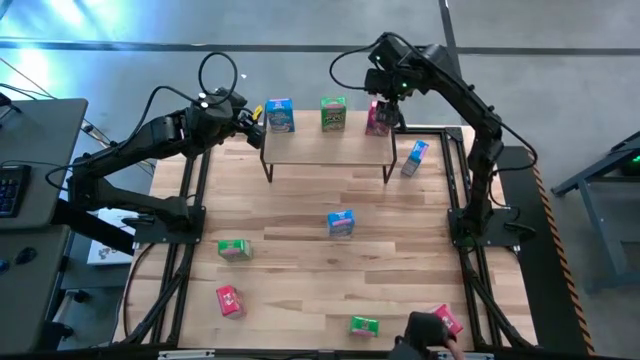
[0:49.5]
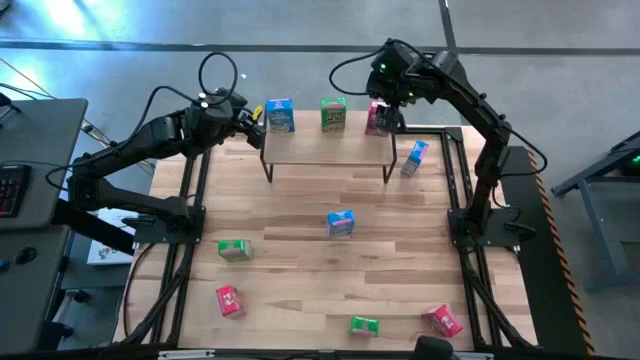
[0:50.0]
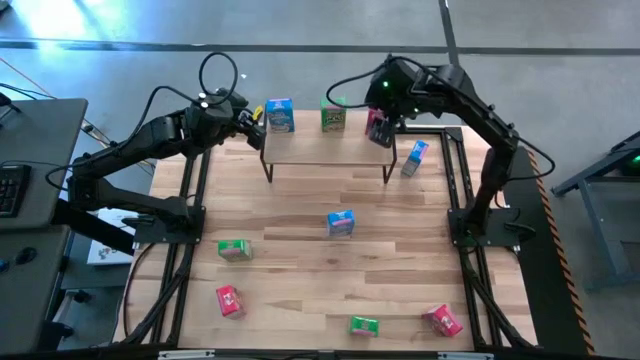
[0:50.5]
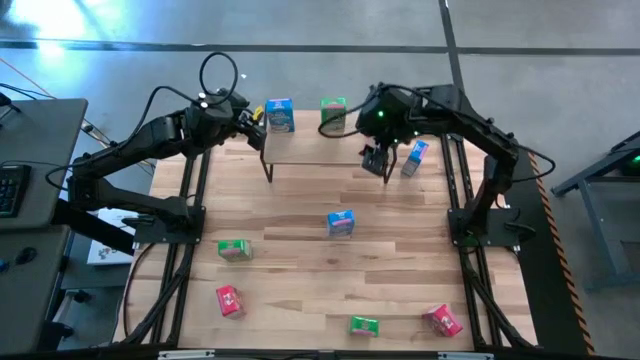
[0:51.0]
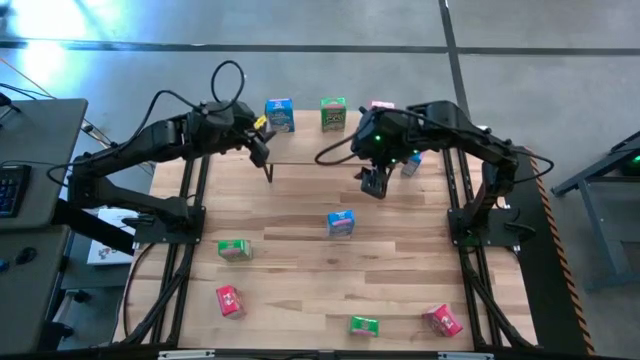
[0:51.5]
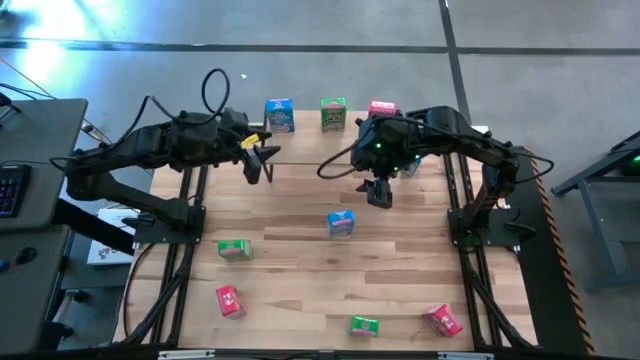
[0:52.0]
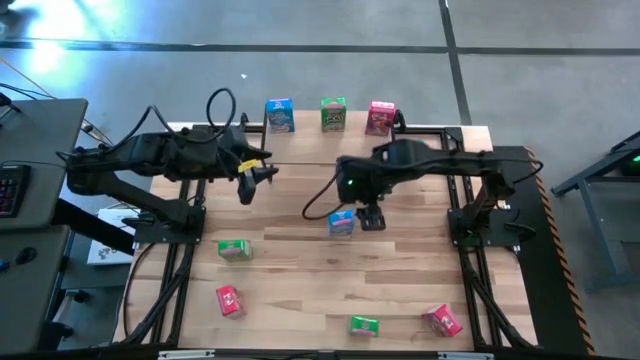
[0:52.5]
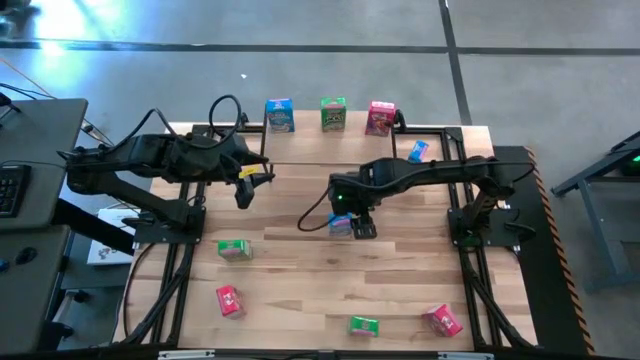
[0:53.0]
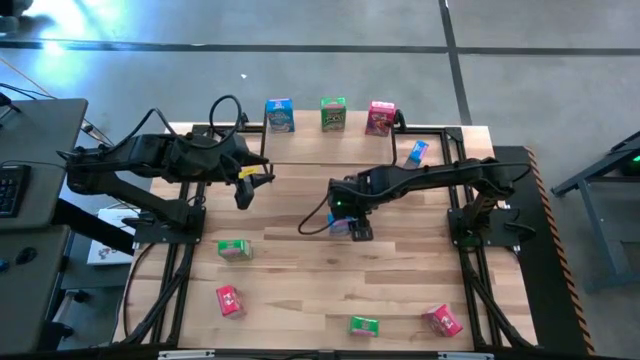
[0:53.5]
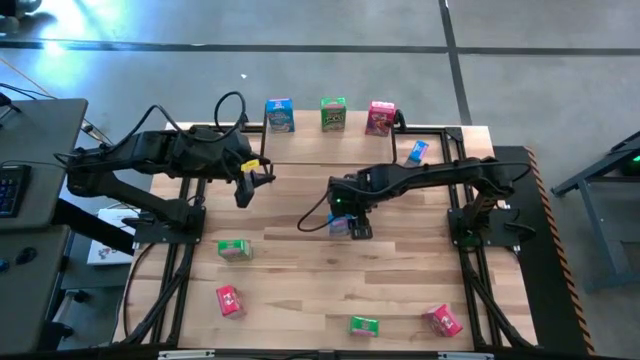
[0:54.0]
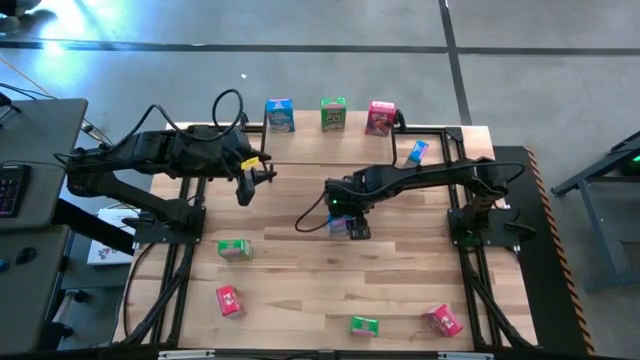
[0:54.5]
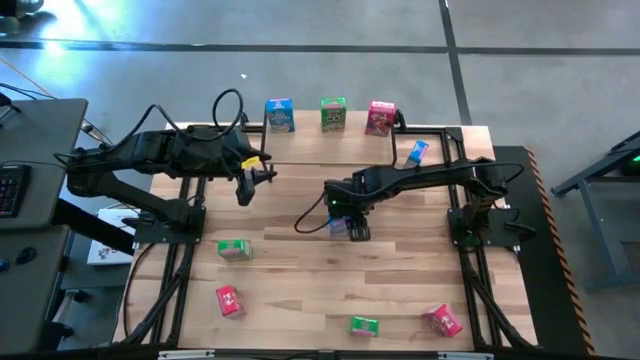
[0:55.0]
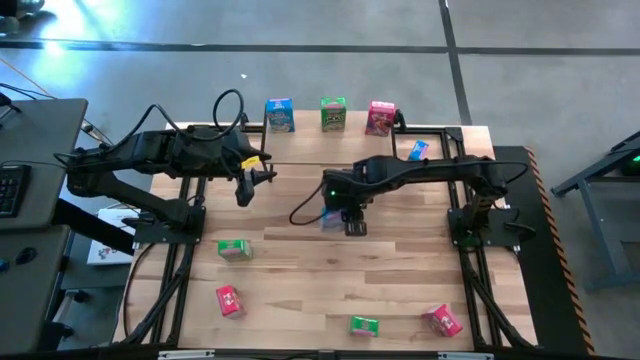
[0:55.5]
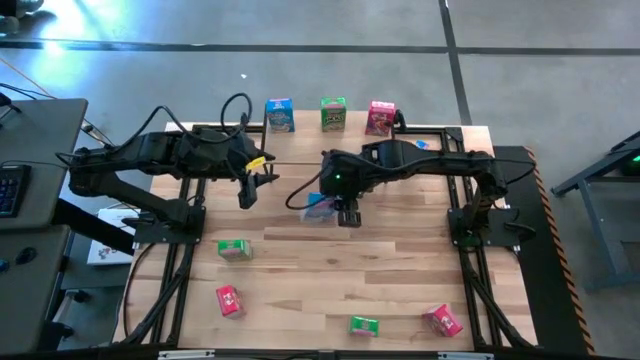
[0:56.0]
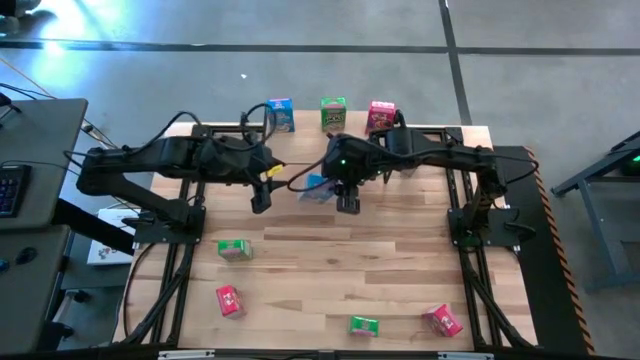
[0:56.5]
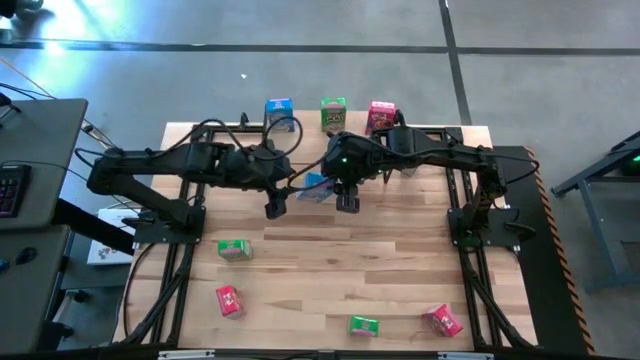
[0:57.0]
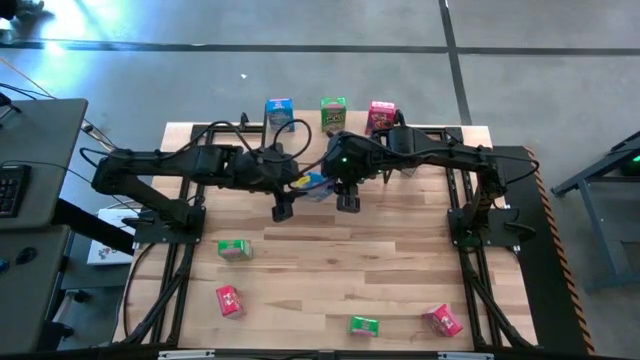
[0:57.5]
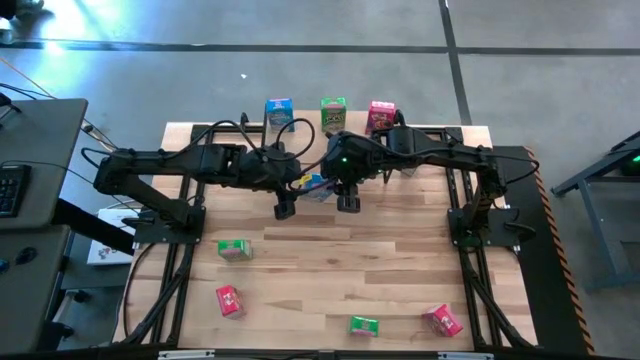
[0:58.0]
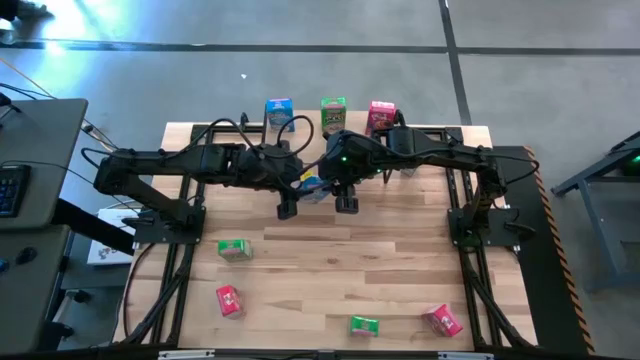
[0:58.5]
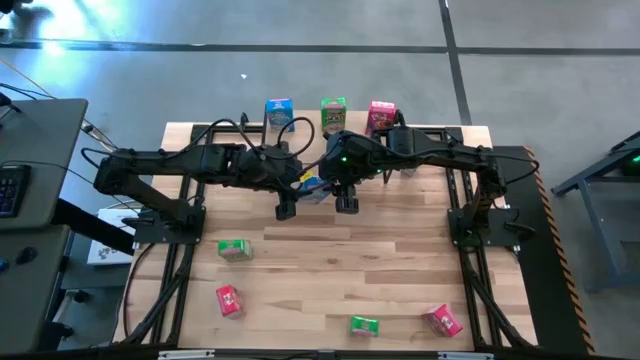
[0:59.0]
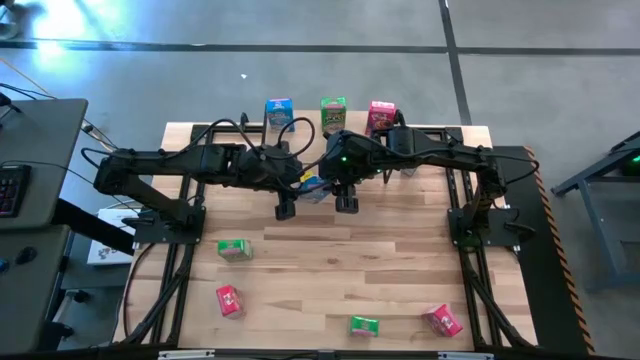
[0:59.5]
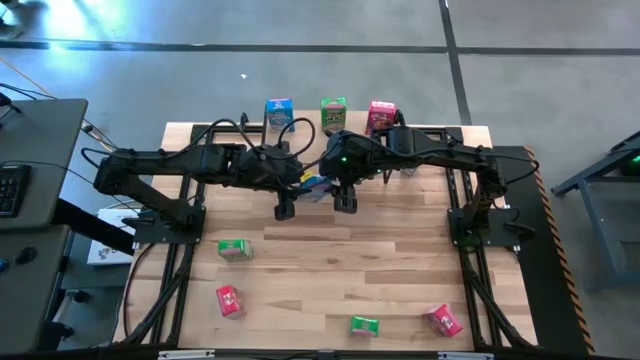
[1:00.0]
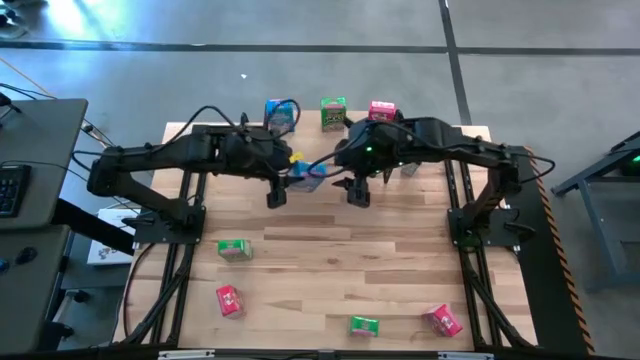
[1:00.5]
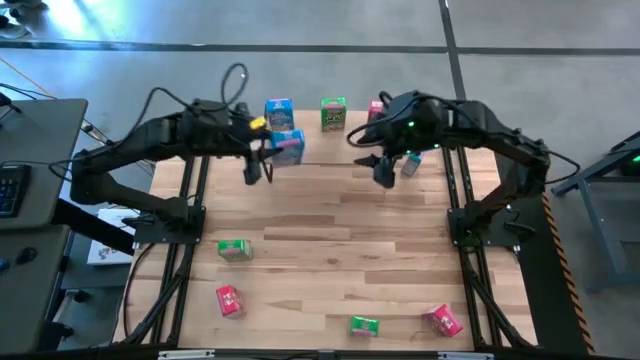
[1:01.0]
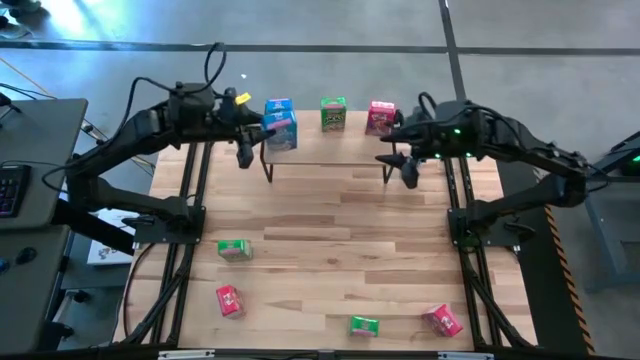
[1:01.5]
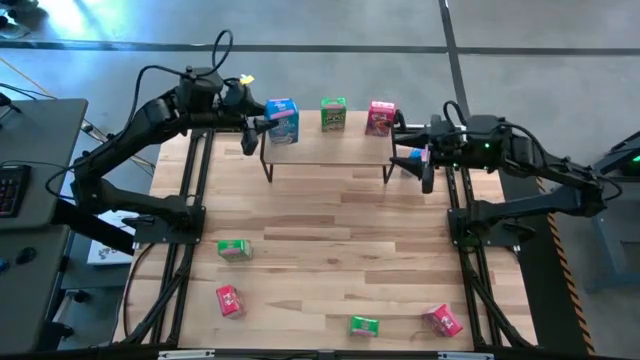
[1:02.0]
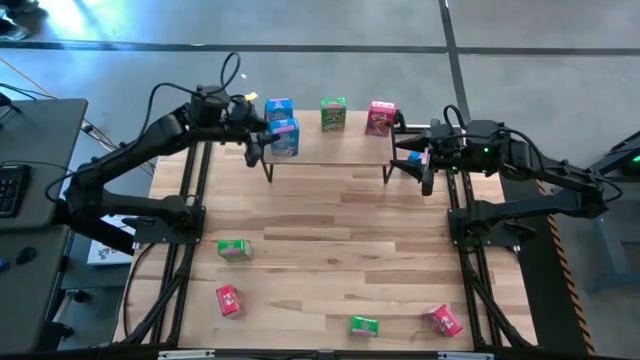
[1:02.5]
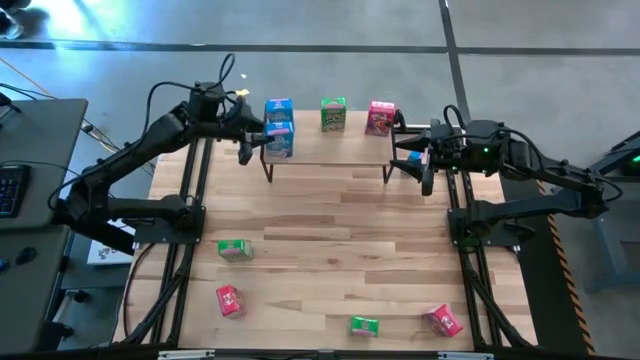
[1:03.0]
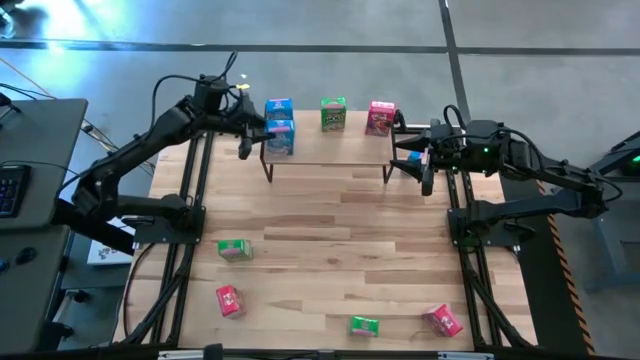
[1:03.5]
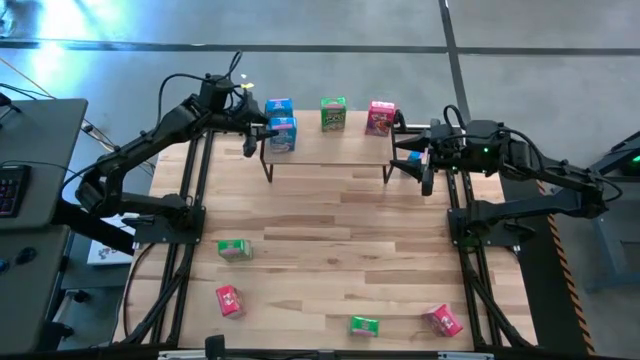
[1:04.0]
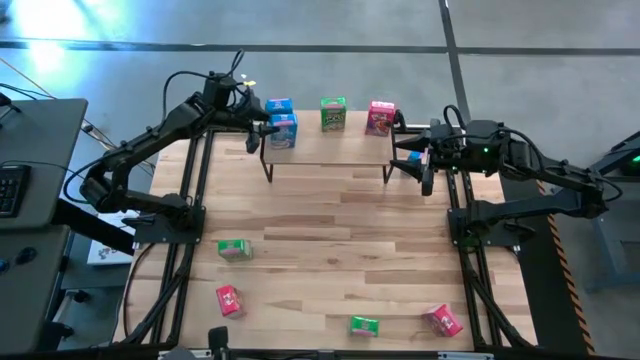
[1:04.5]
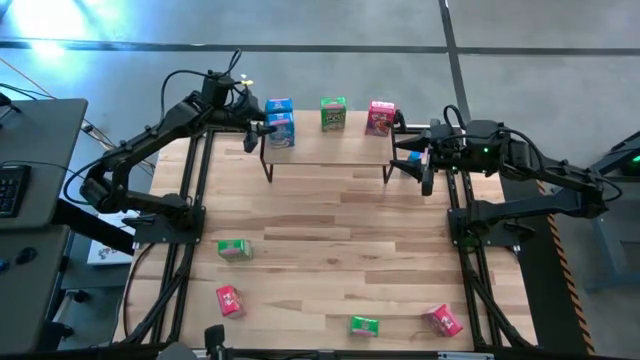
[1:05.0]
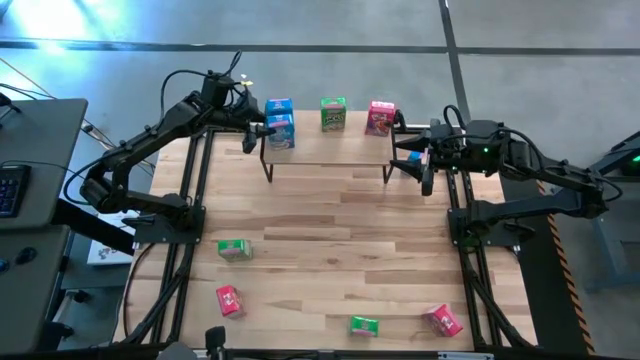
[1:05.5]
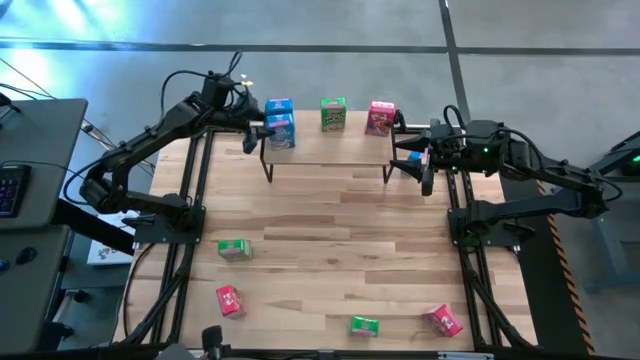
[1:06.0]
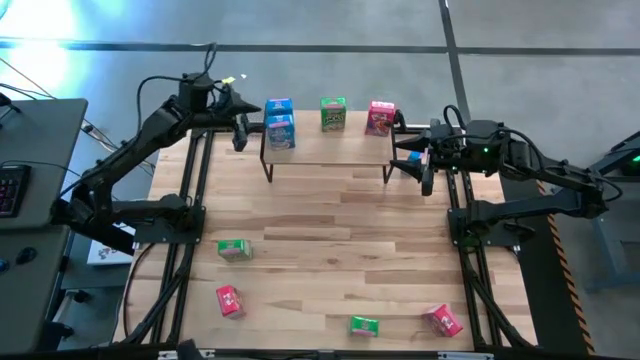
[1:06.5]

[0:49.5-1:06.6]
Task: Stack cereal on shelf
Put the bottom blue cereal box on the shelf aligned with the other blue cereal box

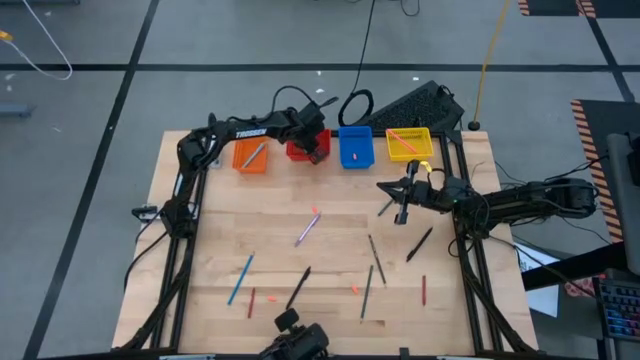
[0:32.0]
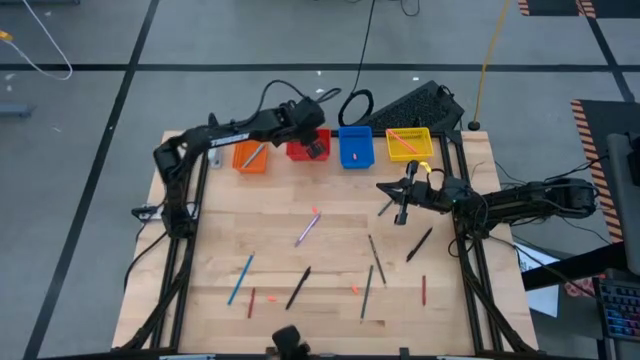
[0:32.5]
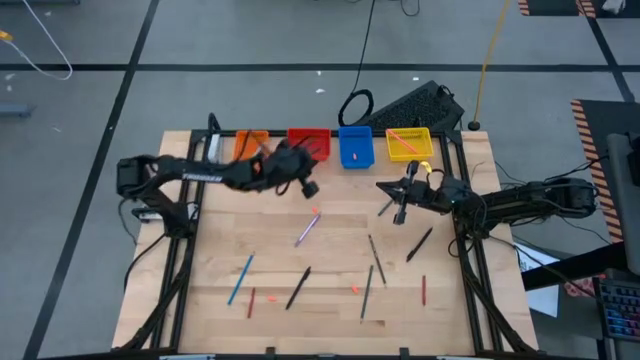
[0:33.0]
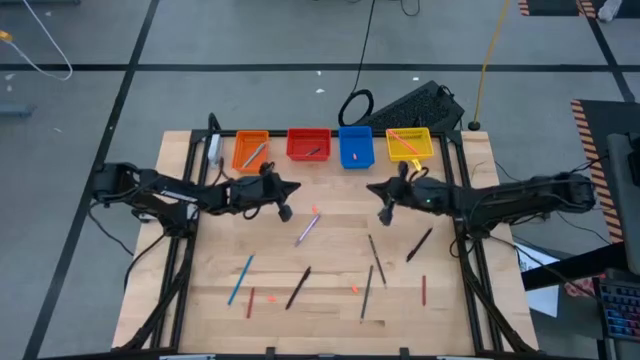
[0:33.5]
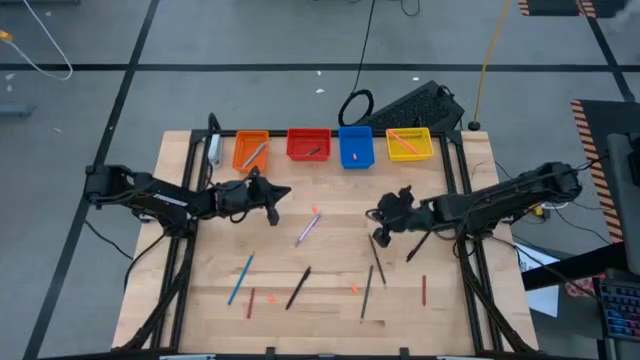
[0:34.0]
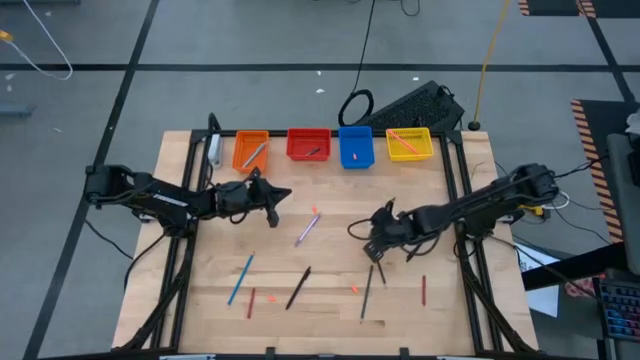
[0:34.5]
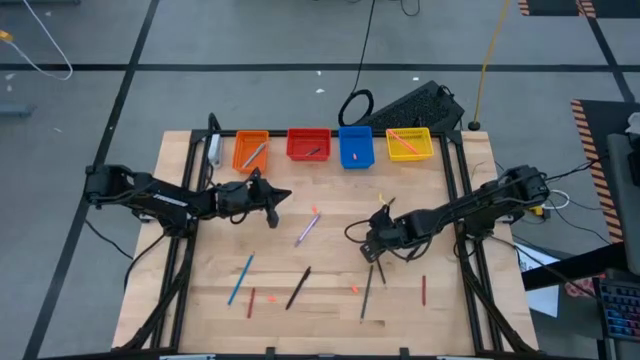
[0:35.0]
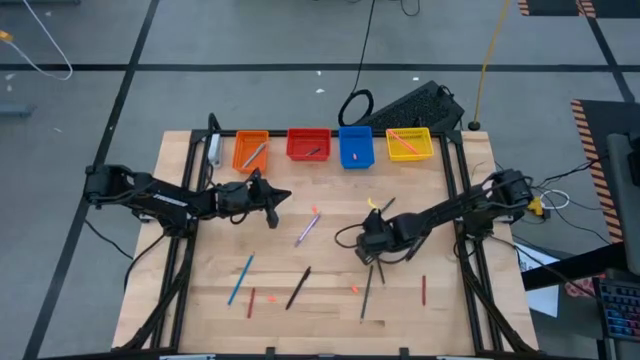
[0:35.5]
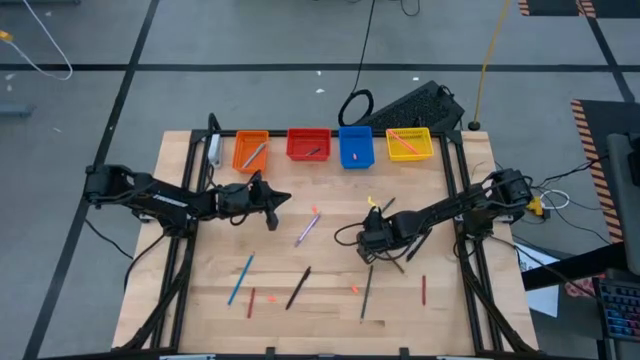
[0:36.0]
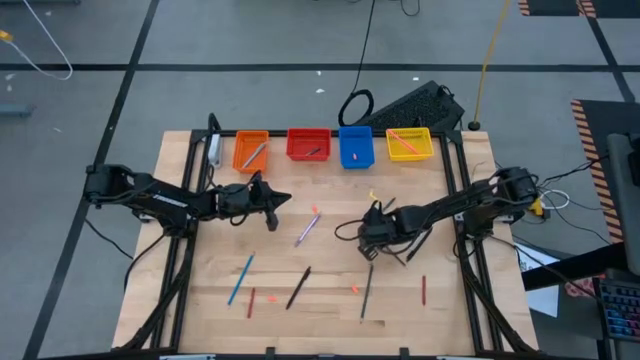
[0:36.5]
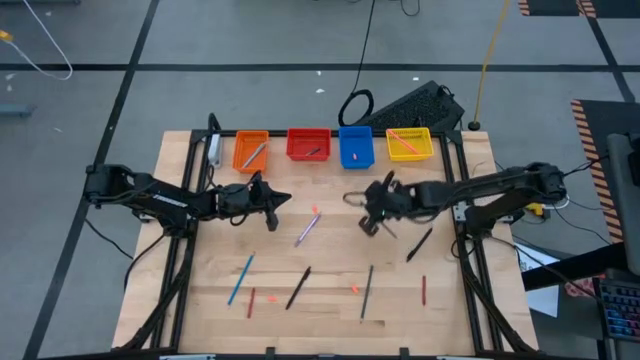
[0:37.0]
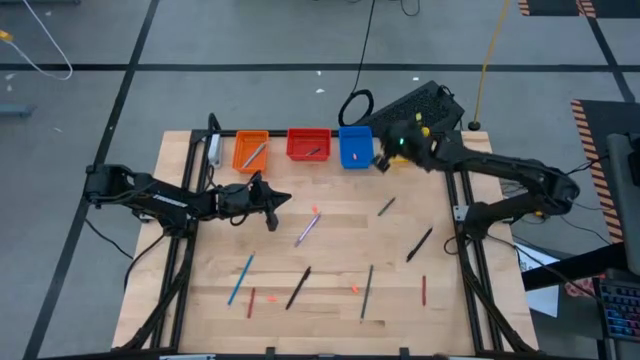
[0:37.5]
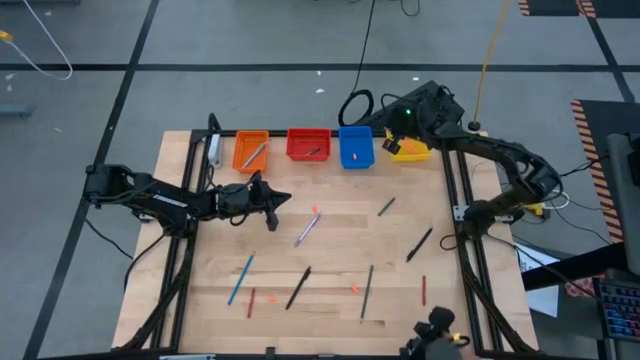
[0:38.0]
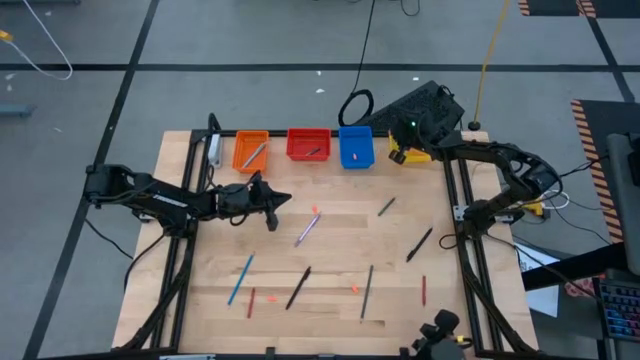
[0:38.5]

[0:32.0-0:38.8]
Task: Sort crayons/erasers/pens/pencils in bins
Put the black pencil into the yellow basket
